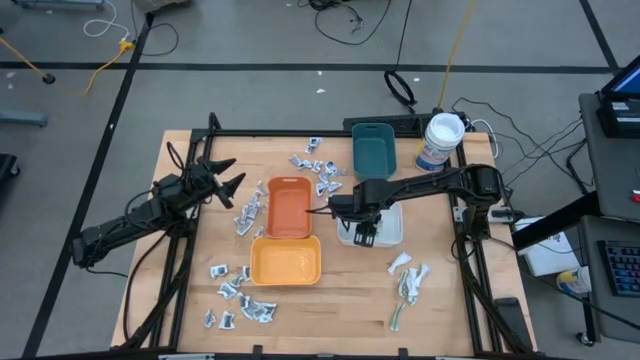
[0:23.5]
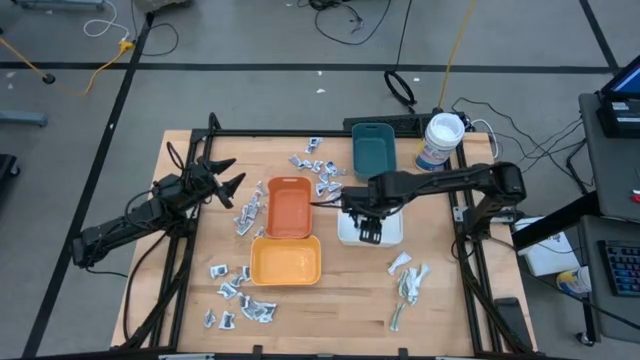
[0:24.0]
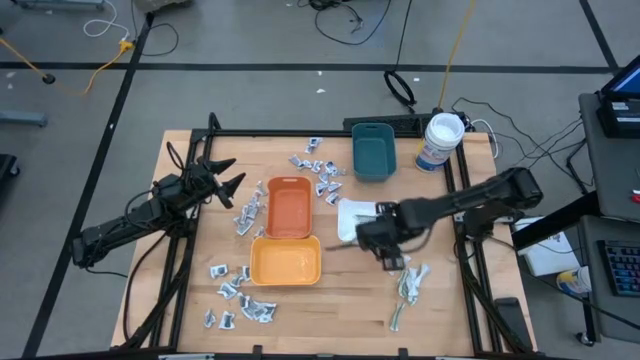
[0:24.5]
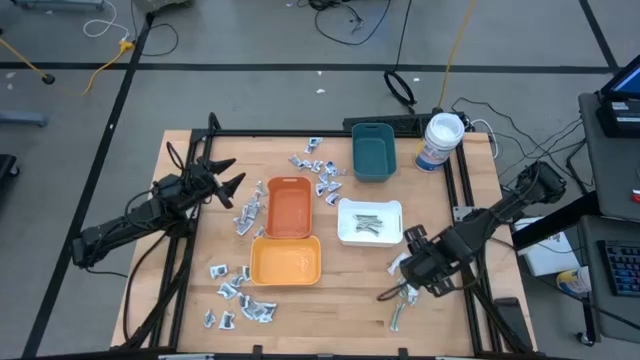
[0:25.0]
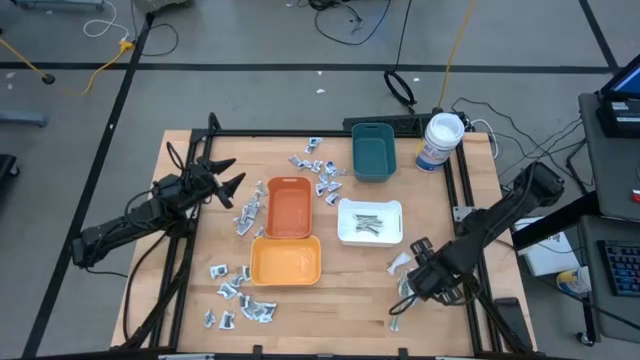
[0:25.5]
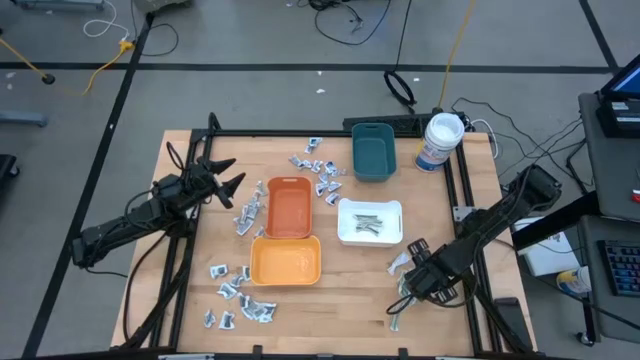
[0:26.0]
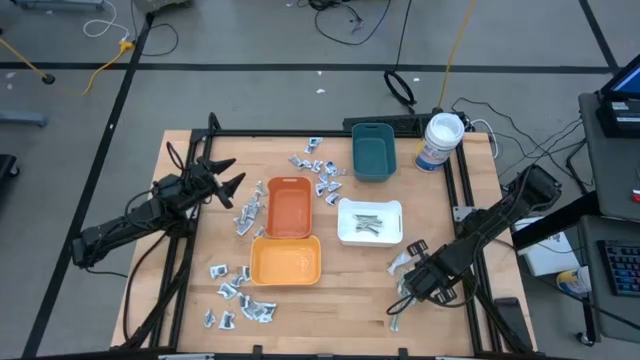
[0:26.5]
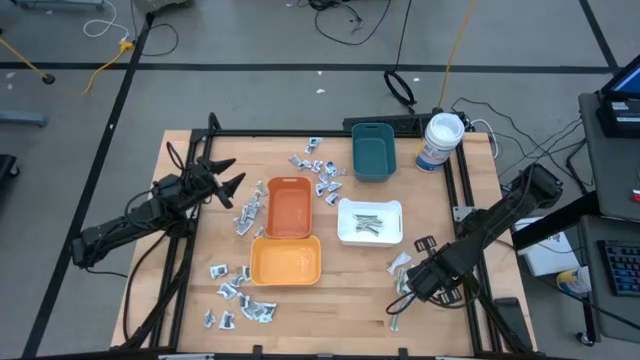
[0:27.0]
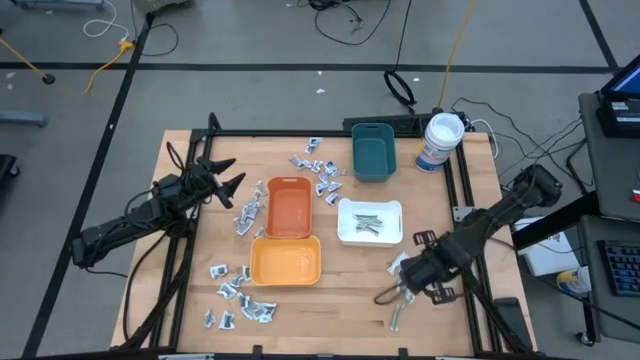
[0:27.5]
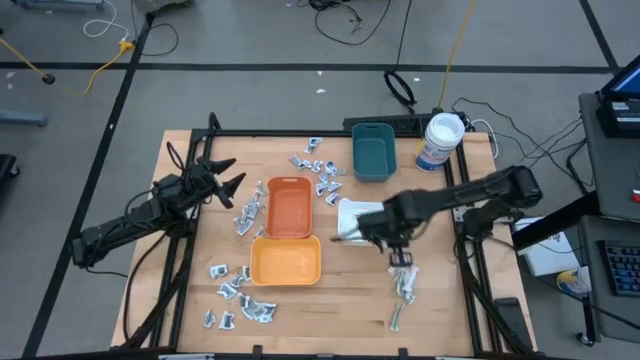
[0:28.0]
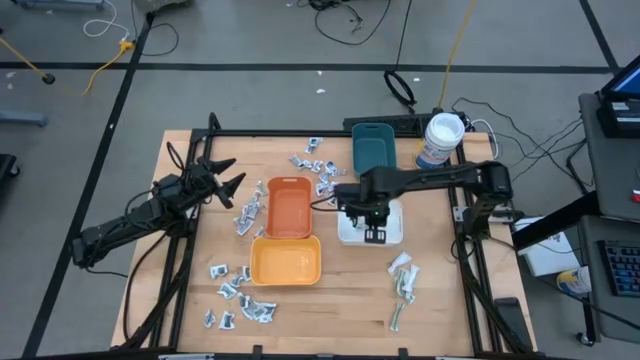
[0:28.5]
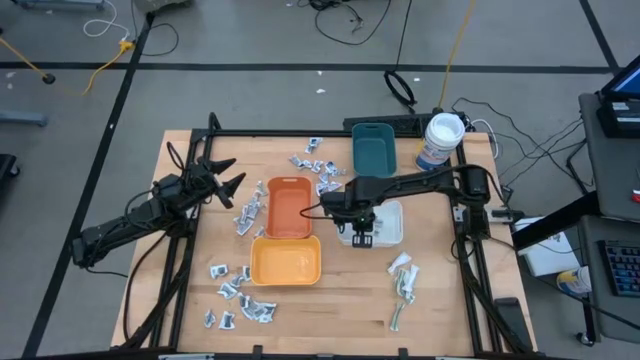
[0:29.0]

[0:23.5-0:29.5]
Task: Pick & Place First Aid Supplies
Put the green sachet into the white bin

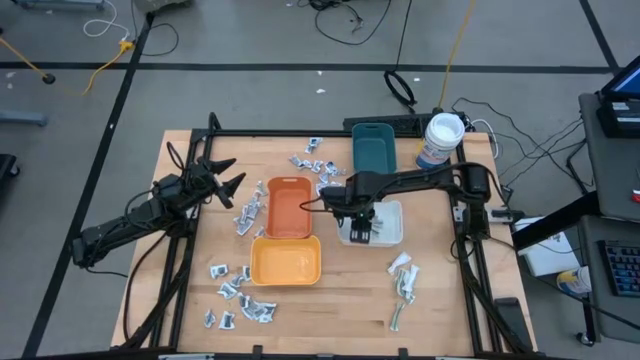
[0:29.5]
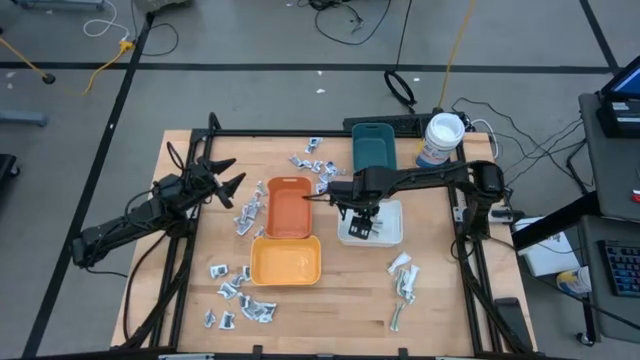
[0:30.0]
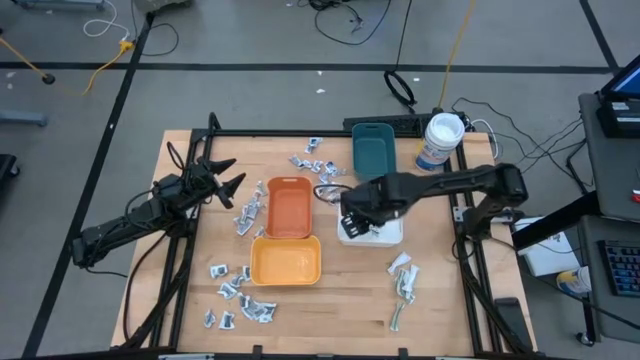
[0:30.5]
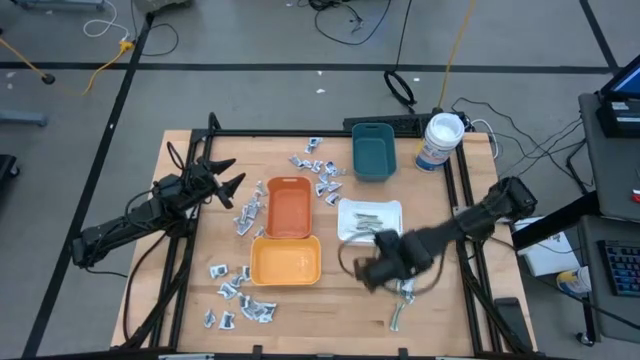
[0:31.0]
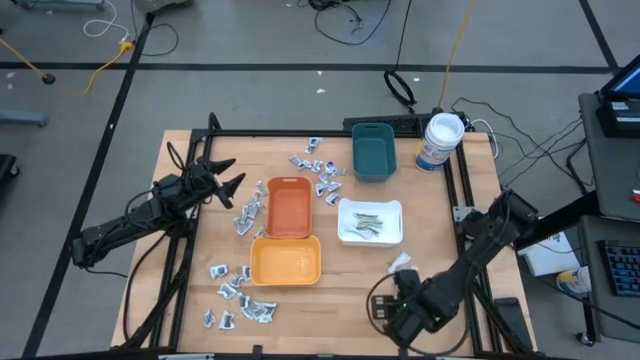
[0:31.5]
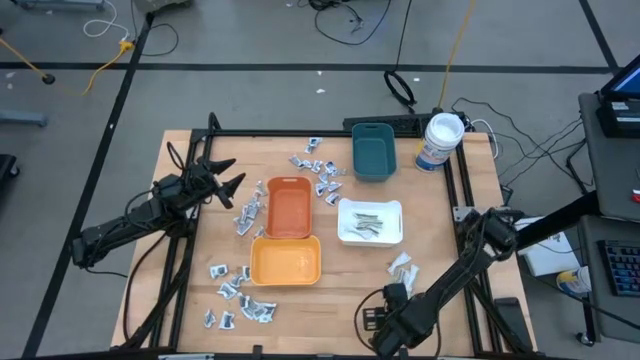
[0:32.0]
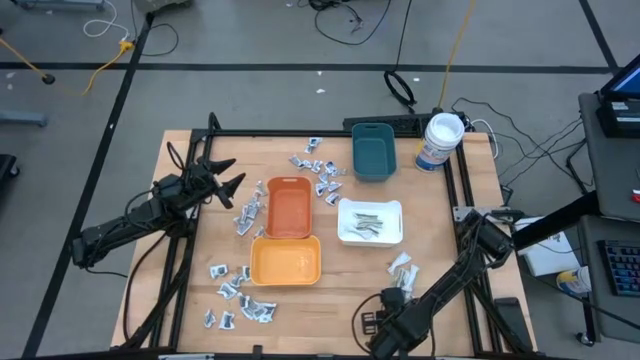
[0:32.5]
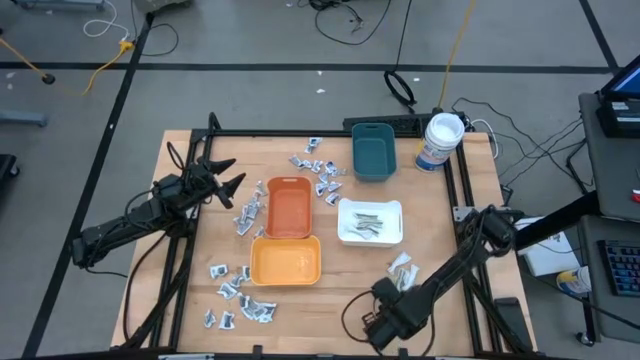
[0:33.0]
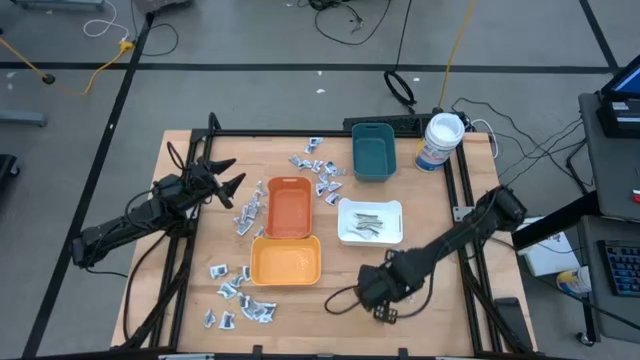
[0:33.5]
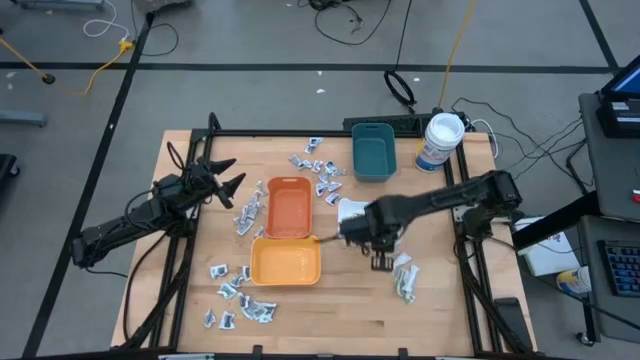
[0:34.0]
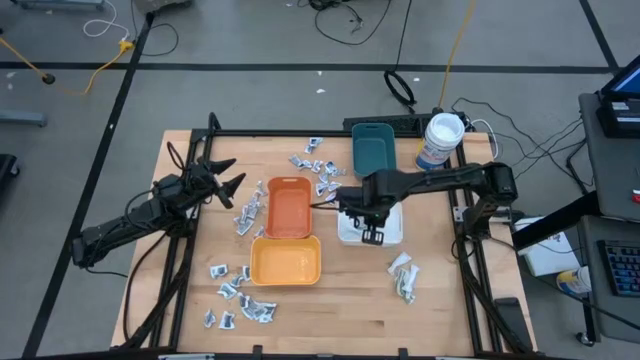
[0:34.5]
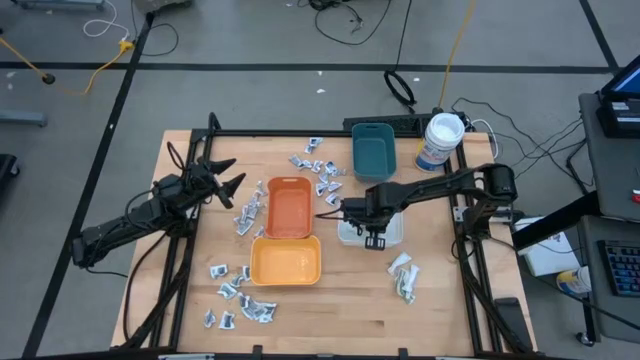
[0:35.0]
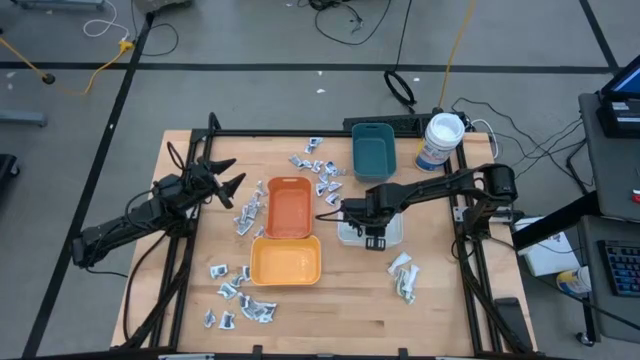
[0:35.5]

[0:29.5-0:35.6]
Put the green sachet into the white bin

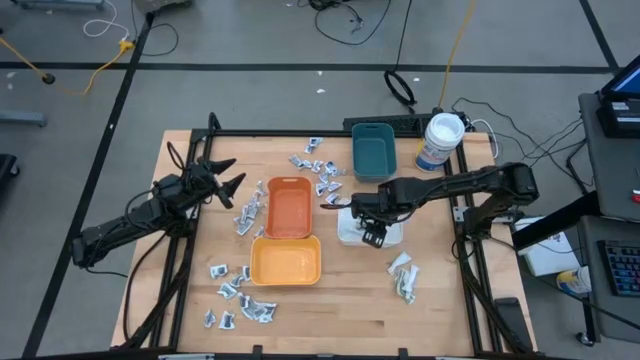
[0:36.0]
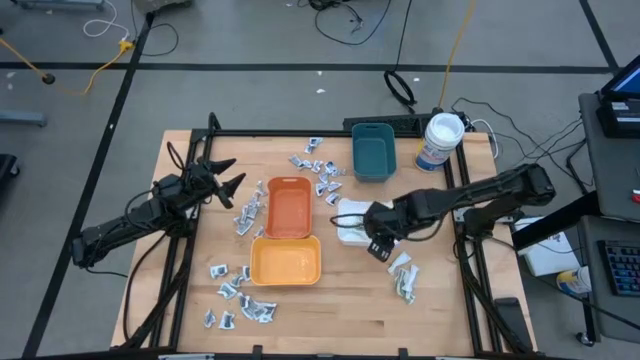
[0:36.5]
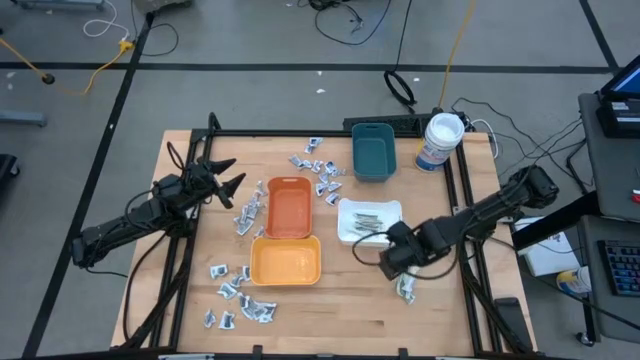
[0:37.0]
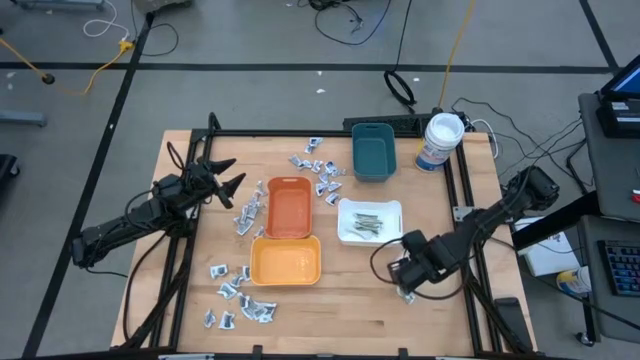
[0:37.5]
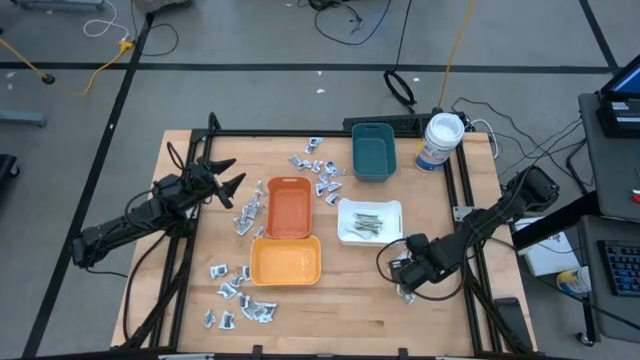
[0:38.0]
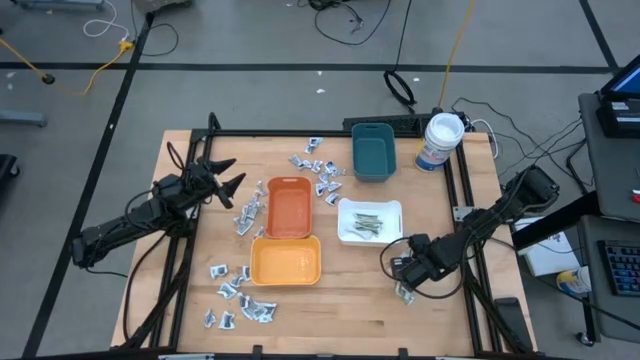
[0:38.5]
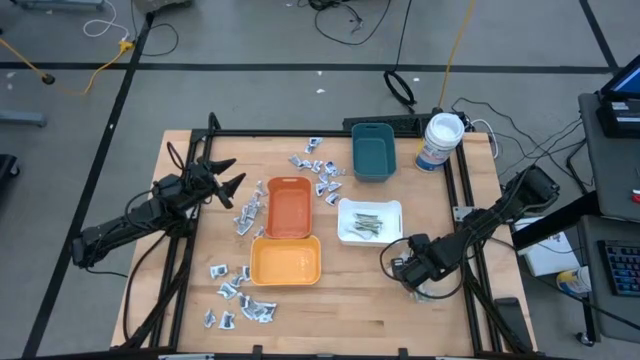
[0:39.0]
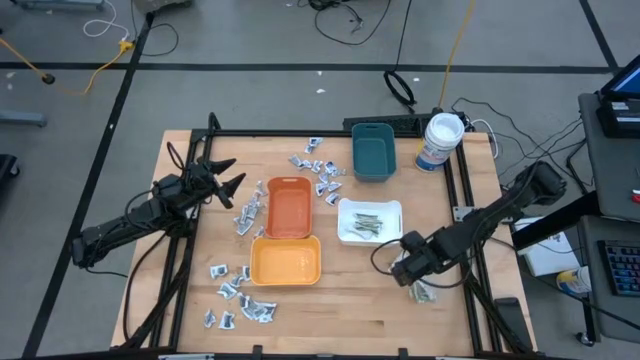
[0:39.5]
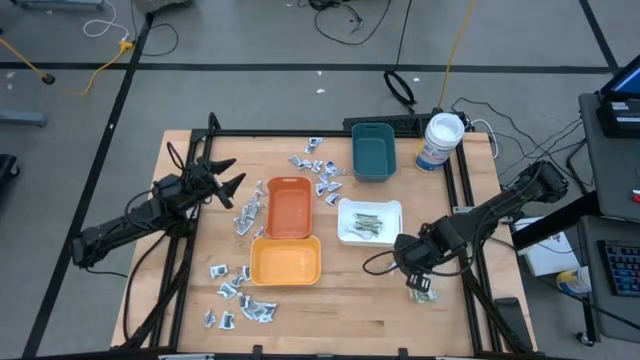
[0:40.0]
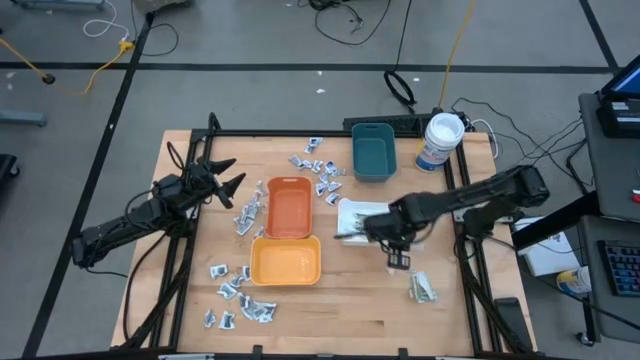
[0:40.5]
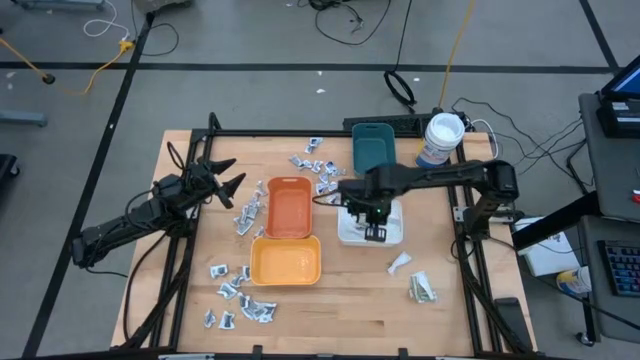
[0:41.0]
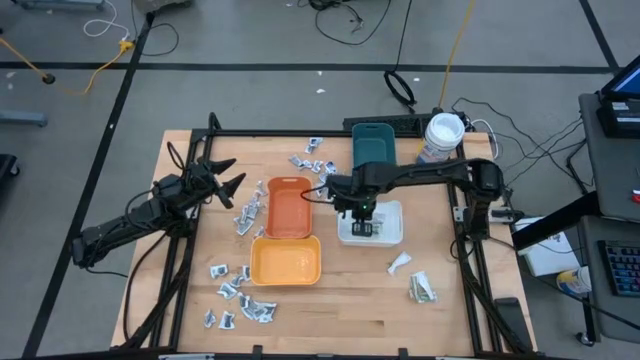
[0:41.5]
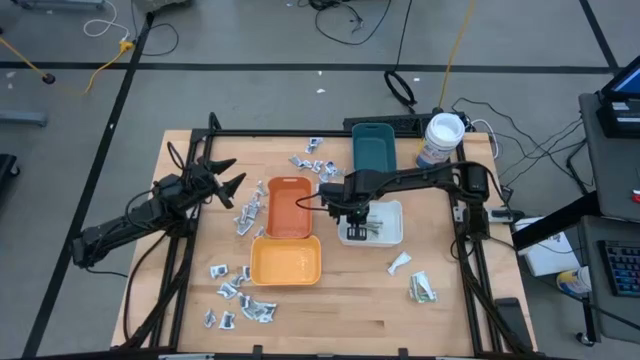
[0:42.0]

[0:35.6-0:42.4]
Put the green sachet into the white bin

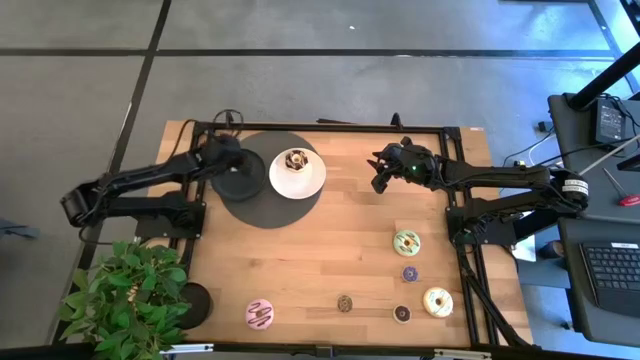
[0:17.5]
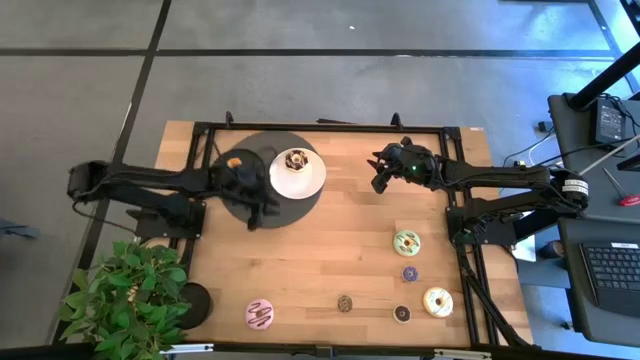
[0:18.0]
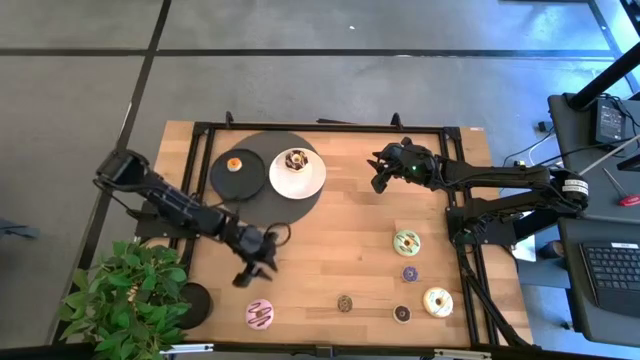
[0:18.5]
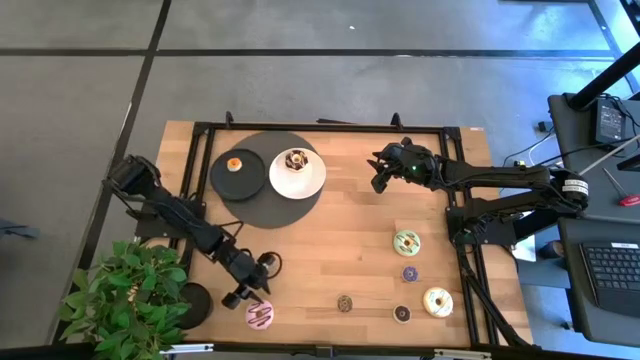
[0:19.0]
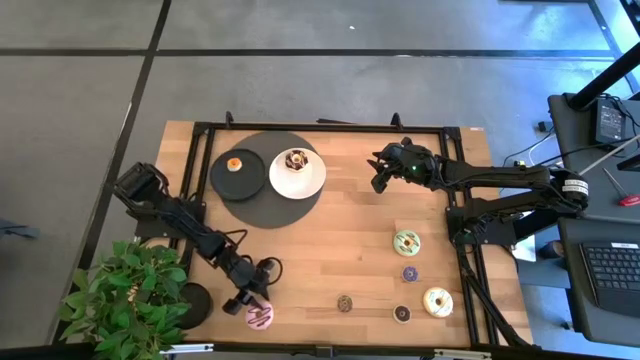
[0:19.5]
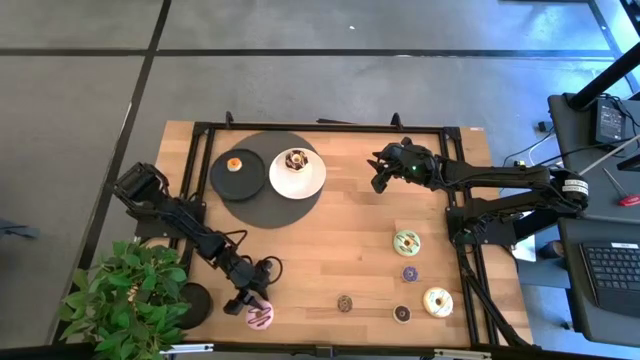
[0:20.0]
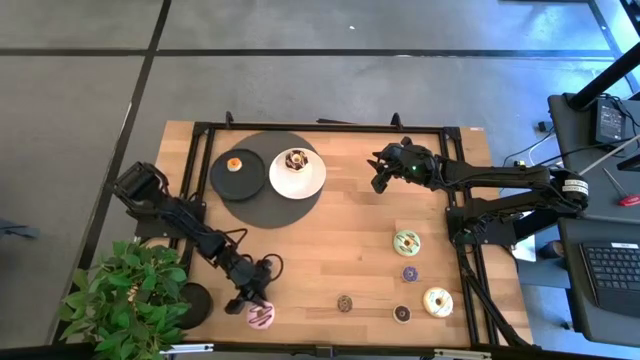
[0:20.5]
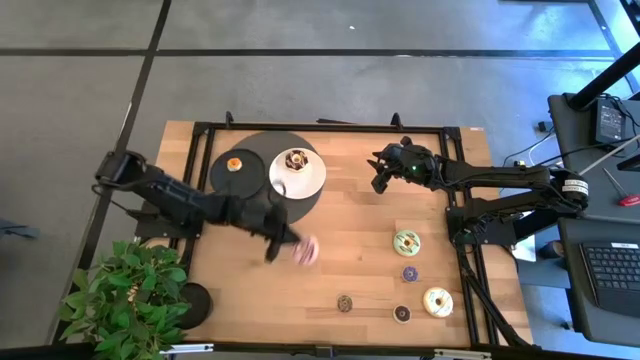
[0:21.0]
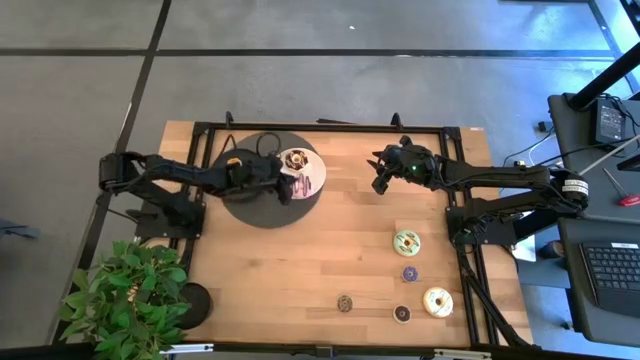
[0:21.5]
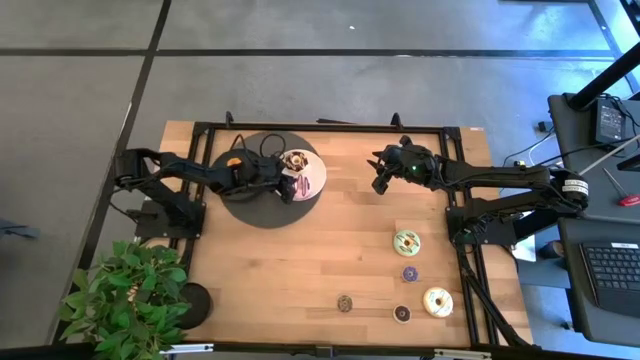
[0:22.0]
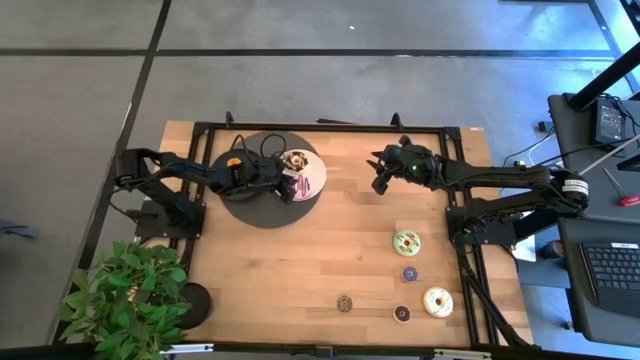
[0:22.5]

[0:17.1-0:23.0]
Task: Pick & Place donuts
Put the big purple donut on the white plate
